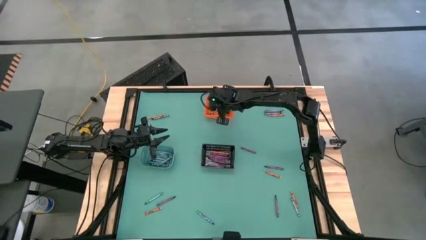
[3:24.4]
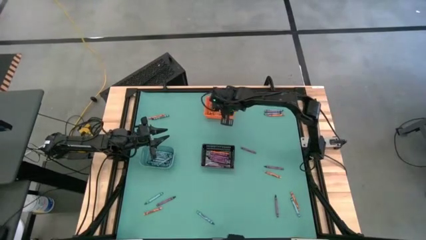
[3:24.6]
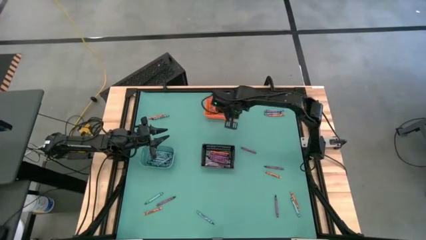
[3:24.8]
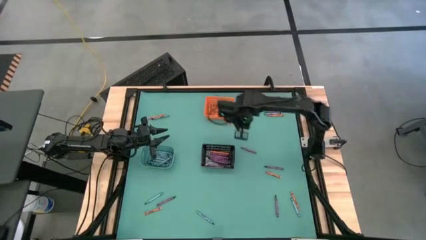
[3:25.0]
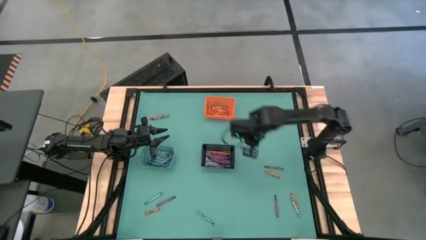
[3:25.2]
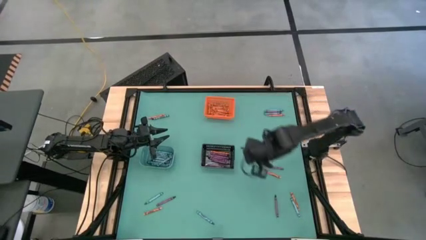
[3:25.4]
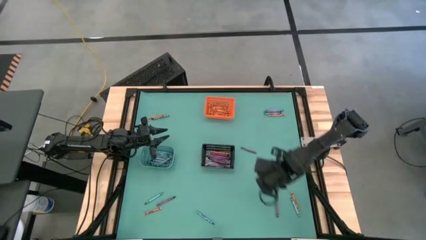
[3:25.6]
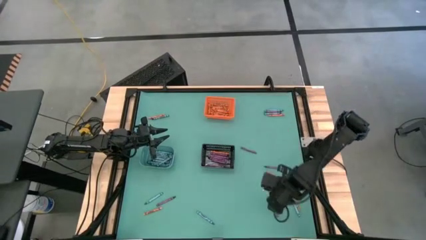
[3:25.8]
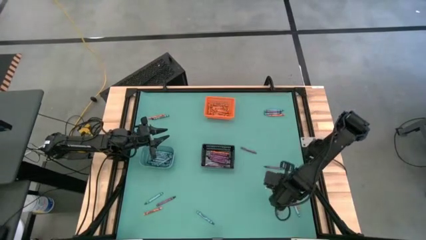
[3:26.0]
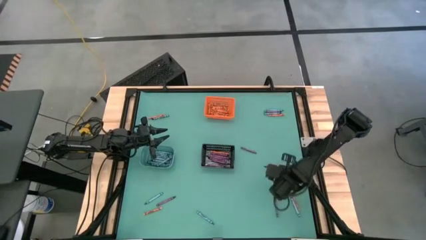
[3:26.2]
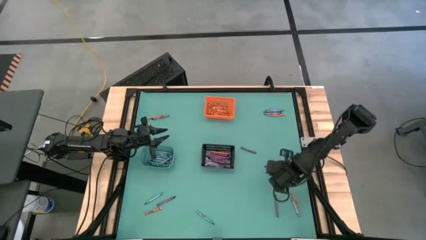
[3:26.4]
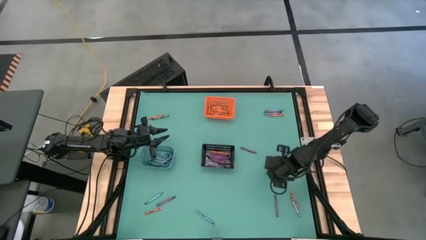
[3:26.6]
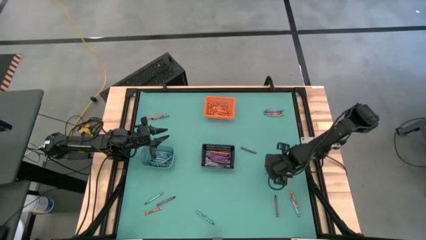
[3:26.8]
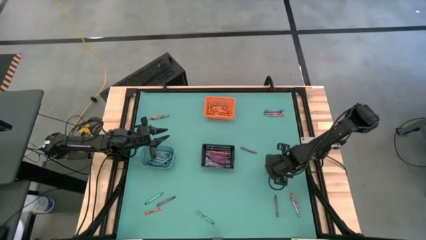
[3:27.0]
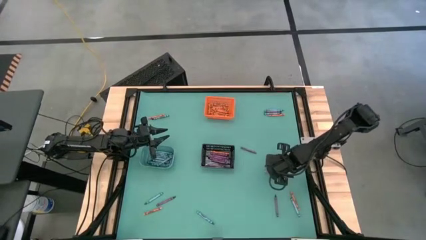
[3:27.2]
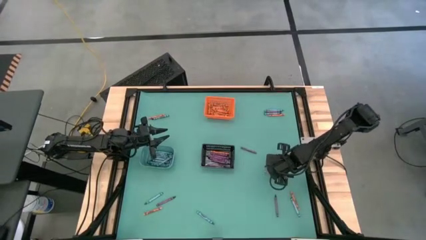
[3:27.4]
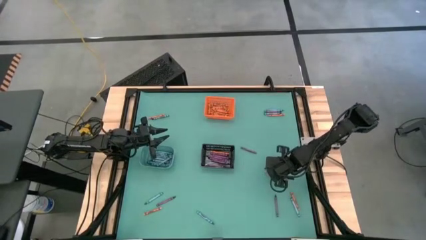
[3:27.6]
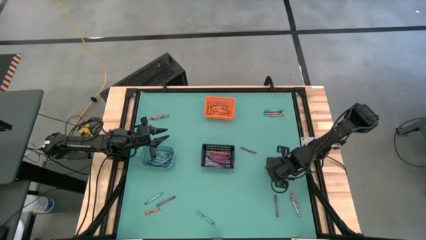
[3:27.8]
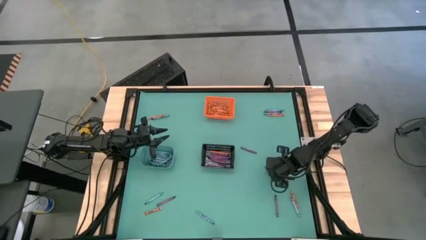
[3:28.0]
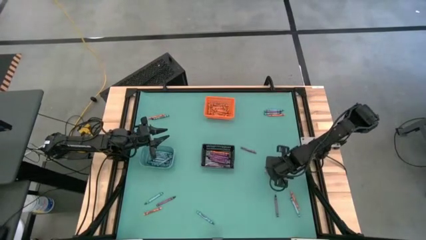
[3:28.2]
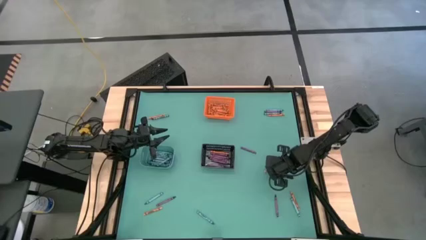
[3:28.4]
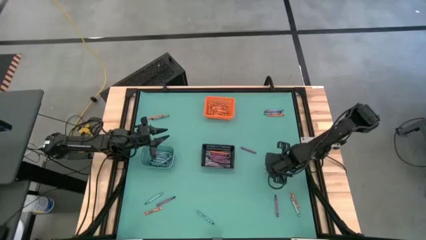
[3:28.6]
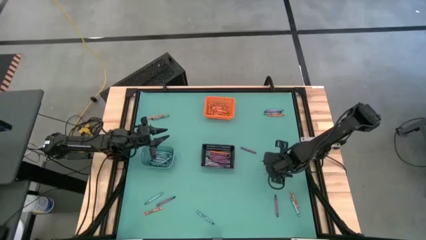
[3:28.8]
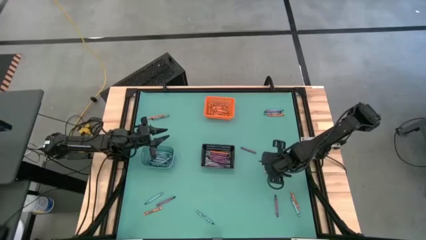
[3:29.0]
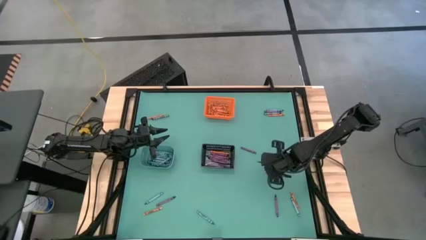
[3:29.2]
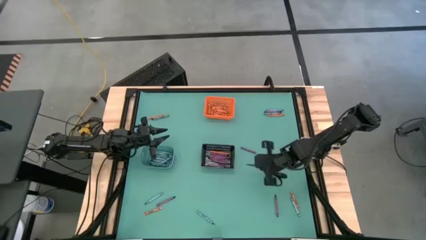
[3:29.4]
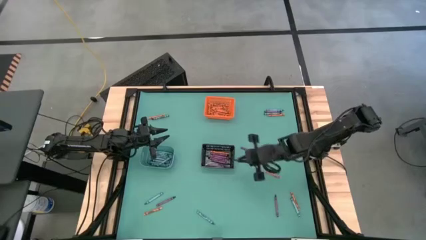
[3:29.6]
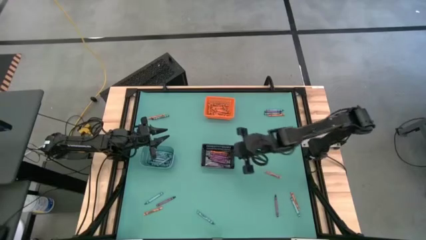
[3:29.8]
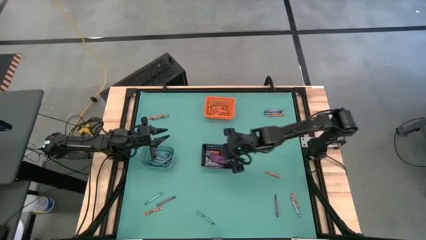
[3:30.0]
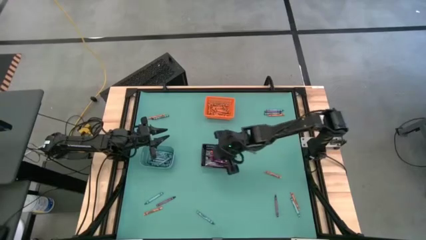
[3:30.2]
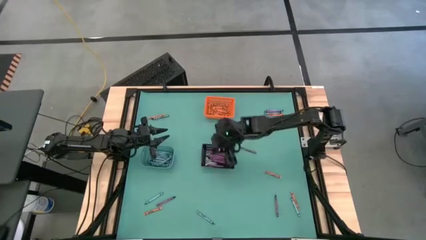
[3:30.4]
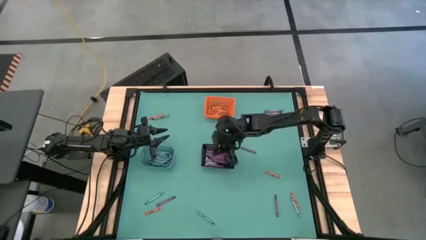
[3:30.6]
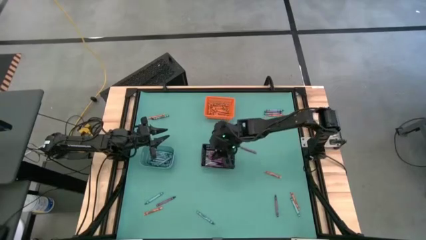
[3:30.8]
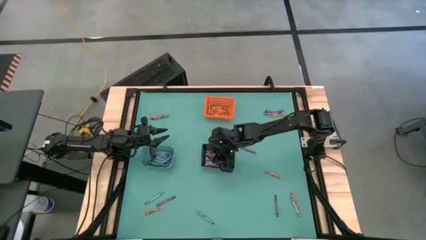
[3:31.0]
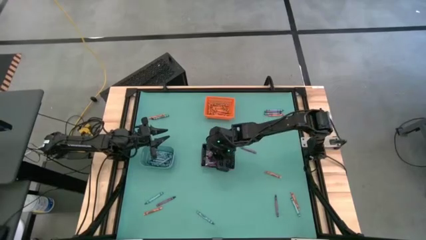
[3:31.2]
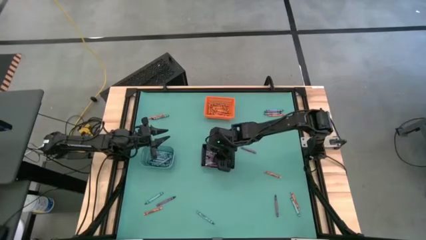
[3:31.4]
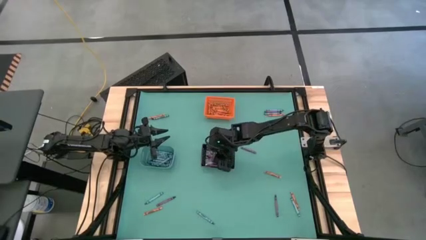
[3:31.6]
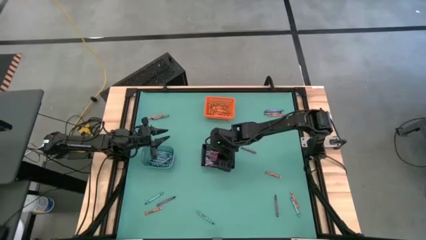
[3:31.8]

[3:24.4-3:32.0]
Task: Sort crayons
Put the violet crayon into the black bin

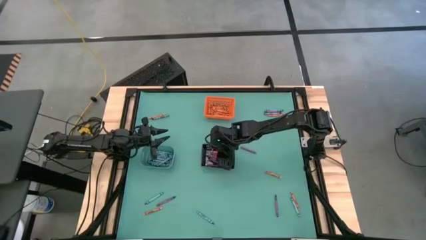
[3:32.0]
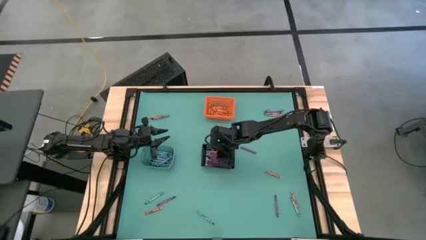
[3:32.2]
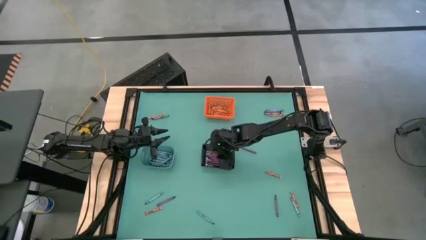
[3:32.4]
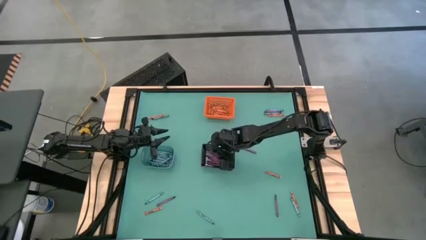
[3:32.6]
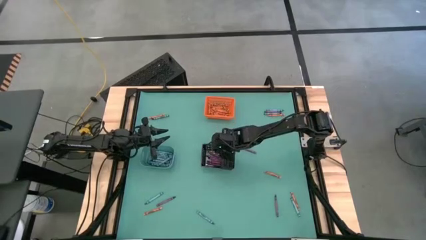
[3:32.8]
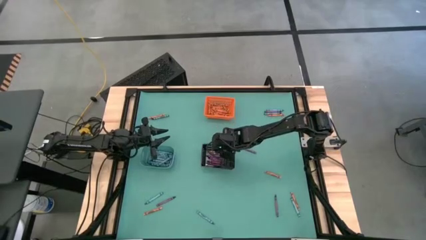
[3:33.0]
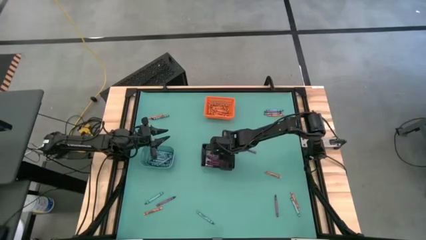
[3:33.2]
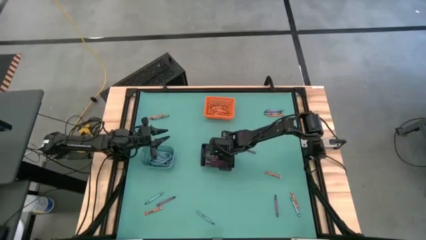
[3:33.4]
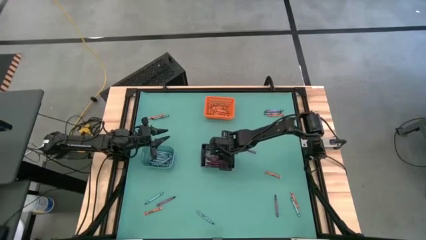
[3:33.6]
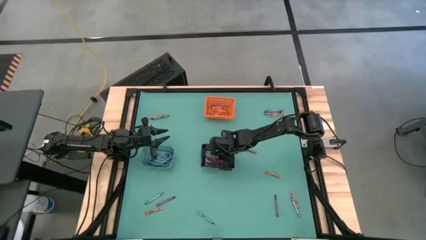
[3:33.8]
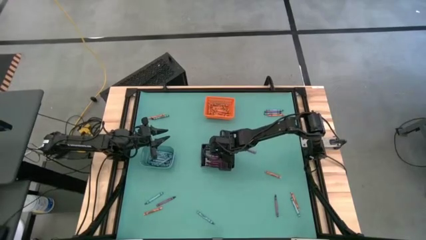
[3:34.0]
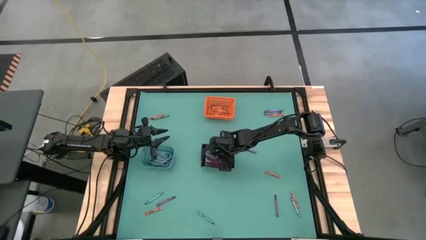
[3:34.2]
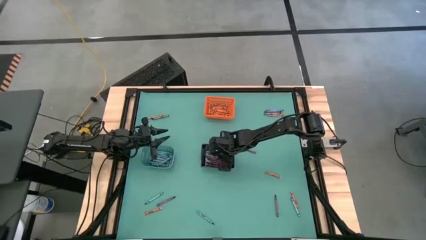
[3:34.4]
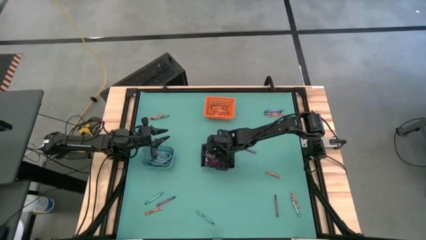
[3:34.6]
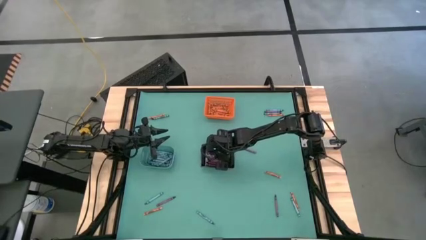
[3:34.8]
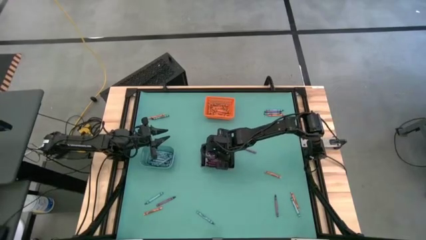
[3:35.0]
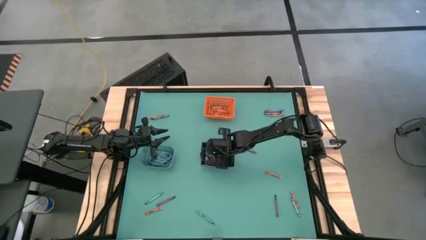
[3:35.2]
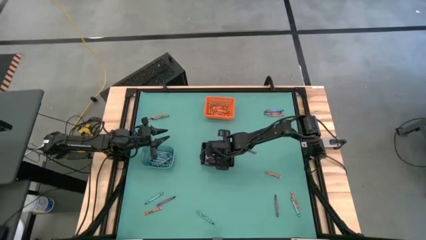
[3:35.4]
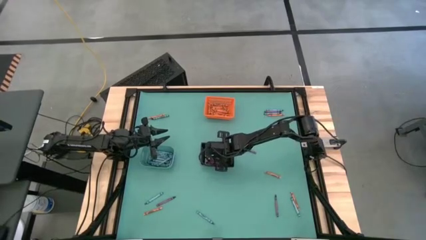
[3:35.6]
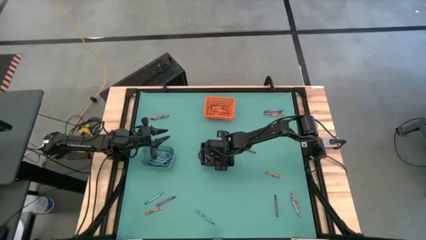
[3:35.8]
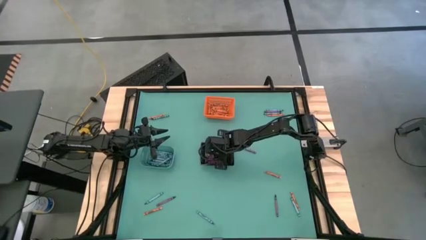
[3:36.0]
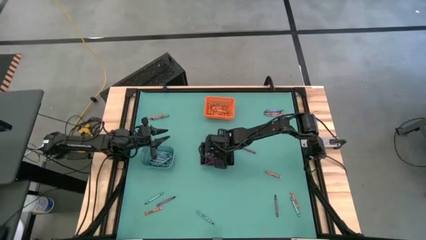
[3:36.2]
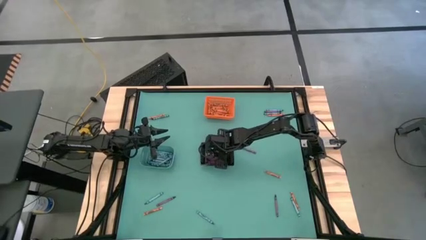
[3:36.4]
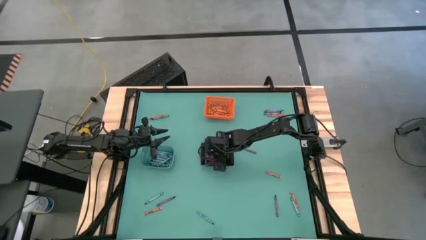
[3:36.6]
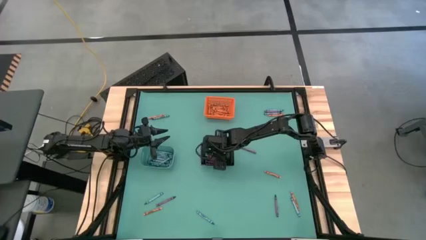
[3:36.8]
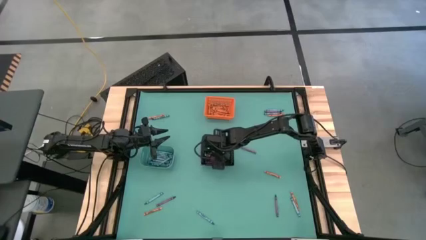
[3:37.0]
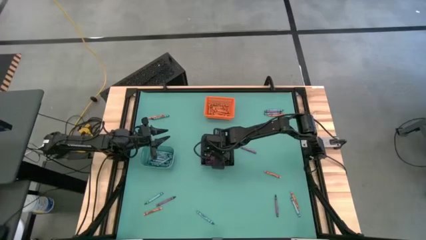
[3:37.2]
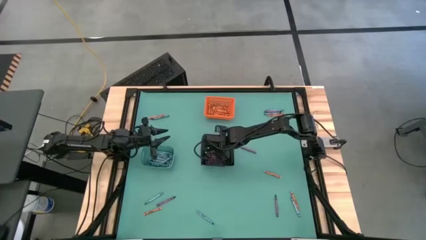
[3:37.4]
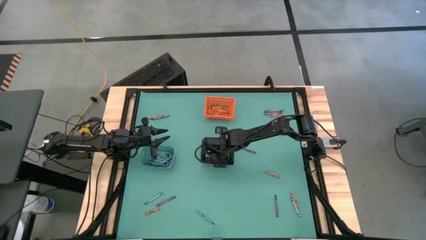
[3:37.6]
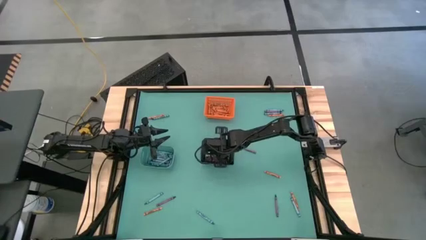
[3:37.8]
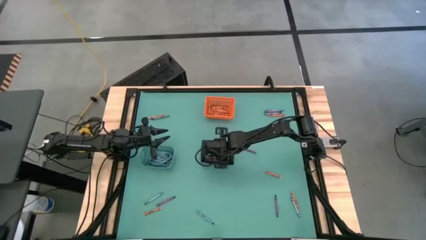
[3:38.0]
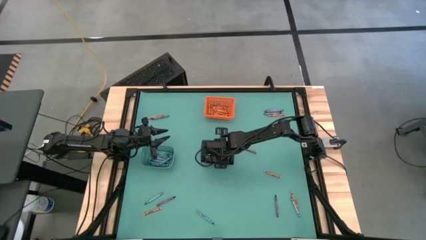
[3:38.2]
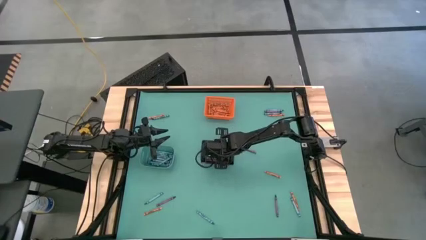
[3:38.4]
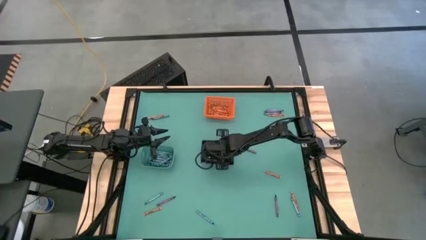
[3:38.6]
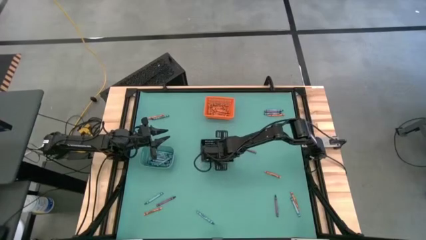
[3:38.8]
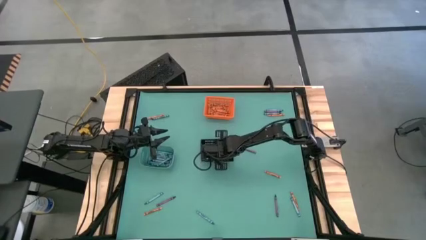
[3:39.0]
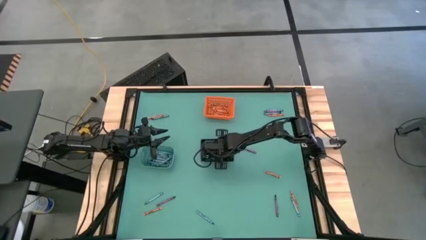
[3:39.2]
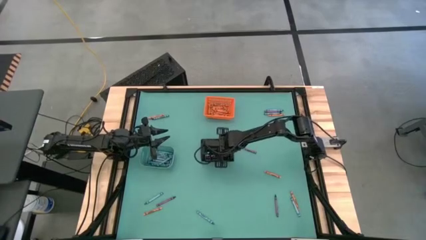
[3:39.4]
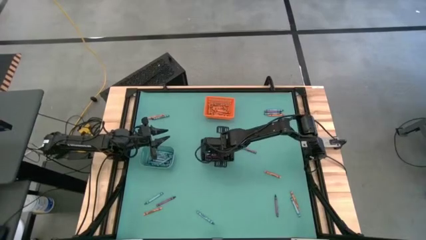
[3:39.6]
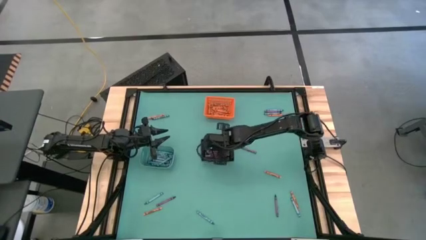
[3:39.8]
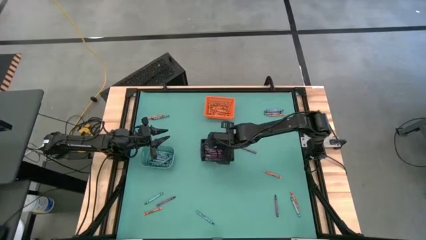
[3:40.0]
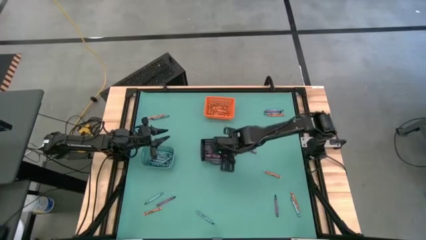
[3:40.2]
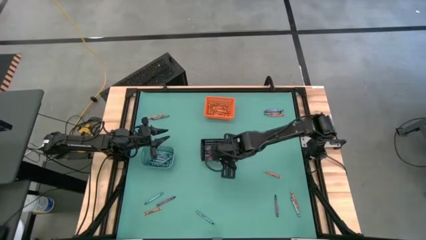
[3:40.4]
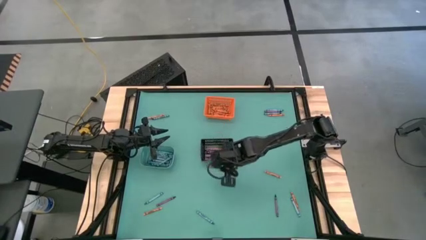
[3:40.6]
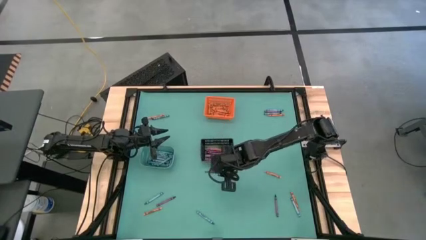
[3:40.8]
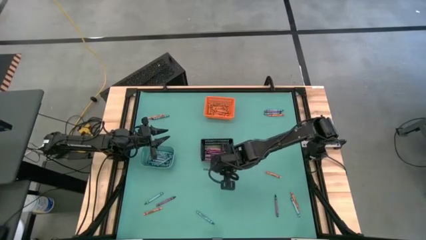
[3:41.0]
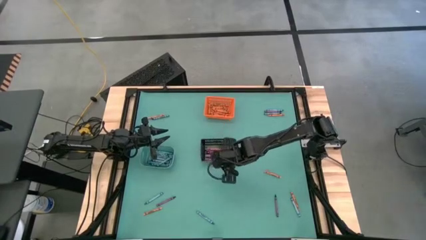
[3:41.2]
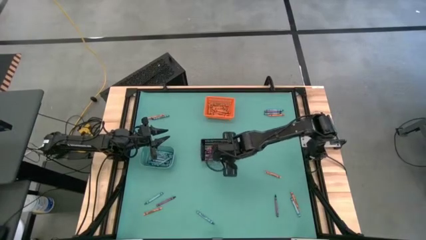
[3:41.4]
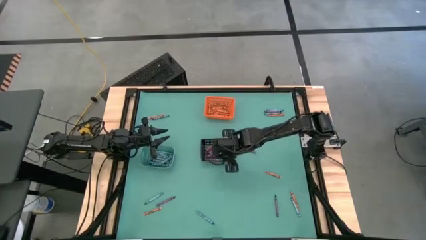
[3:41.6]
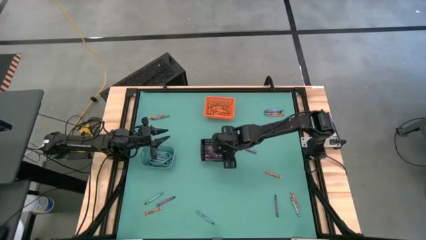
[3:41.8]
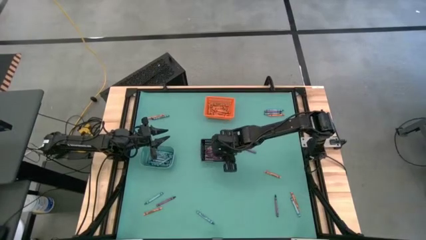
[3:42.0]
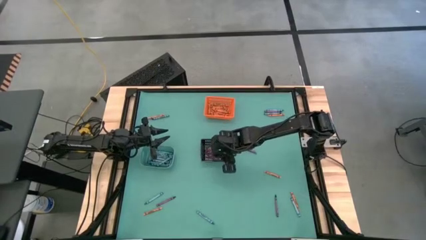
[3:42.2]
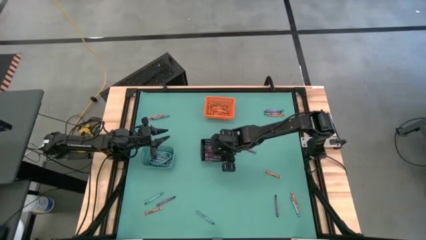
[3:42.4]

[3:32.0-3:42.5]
Put the orange crayon into the orange bin
